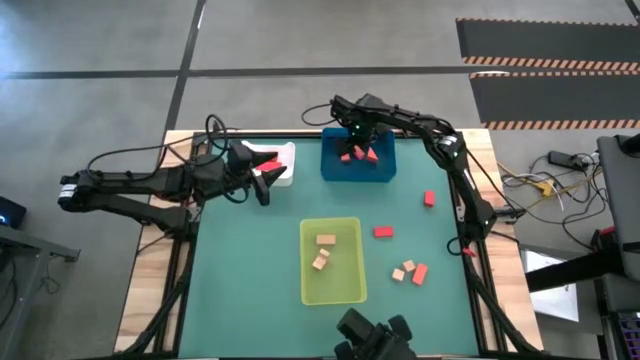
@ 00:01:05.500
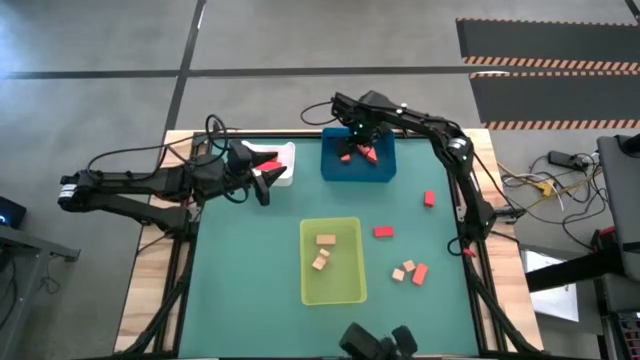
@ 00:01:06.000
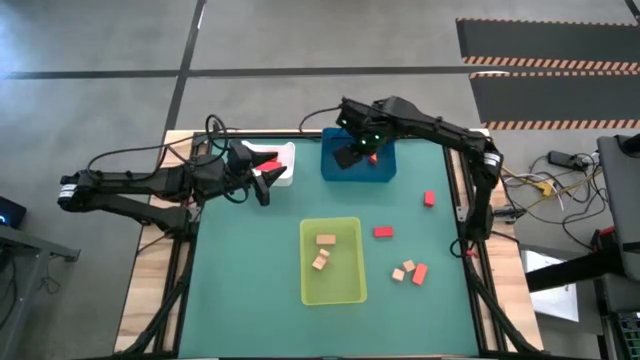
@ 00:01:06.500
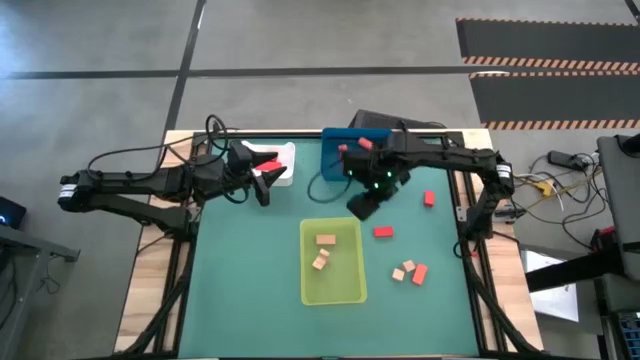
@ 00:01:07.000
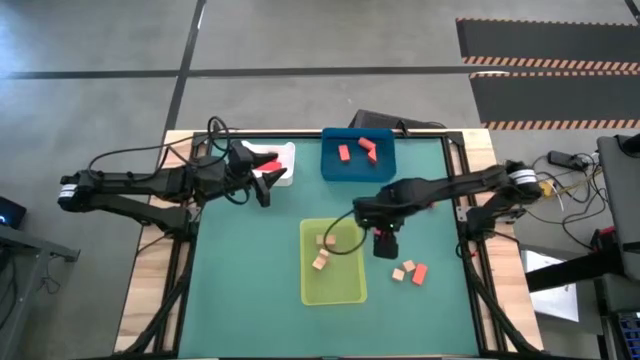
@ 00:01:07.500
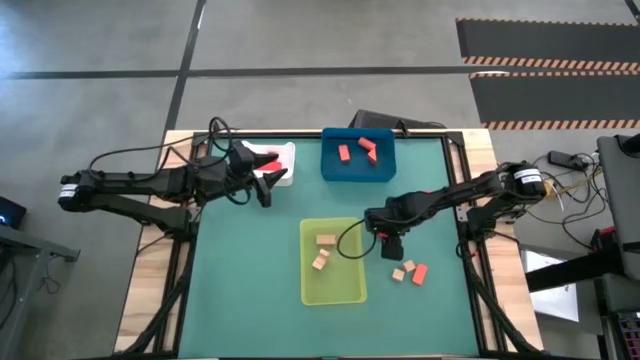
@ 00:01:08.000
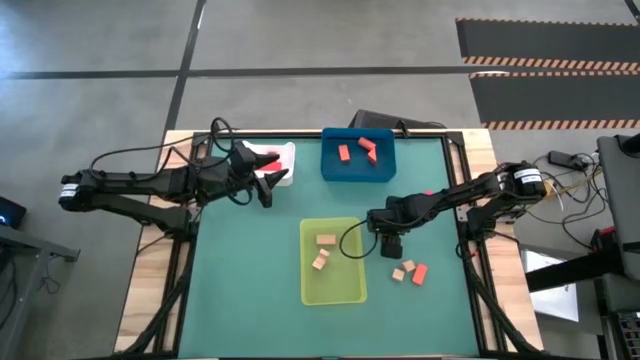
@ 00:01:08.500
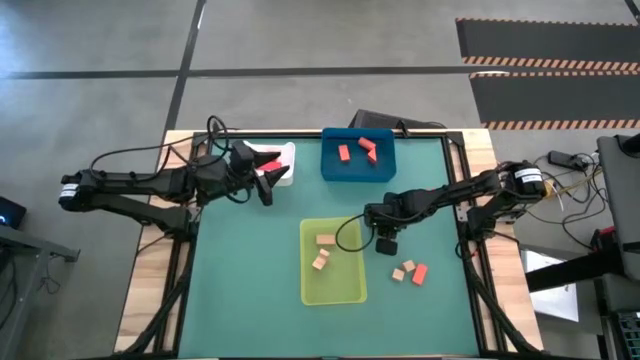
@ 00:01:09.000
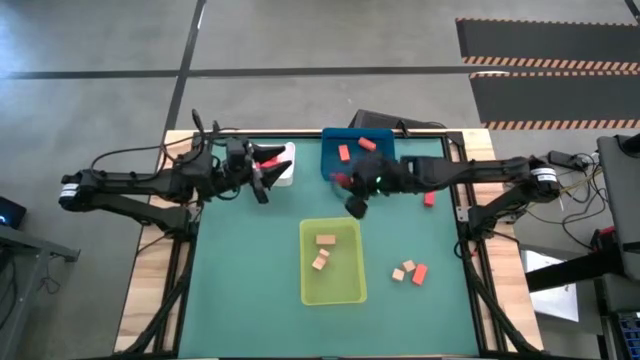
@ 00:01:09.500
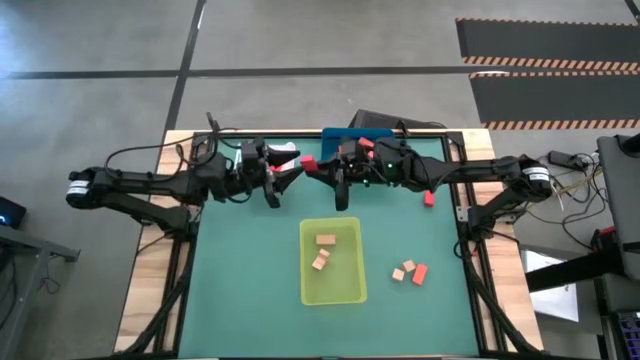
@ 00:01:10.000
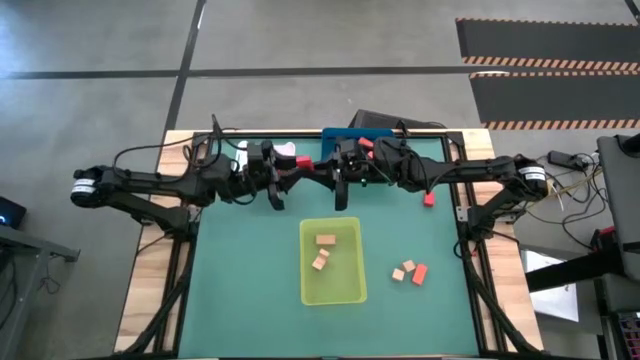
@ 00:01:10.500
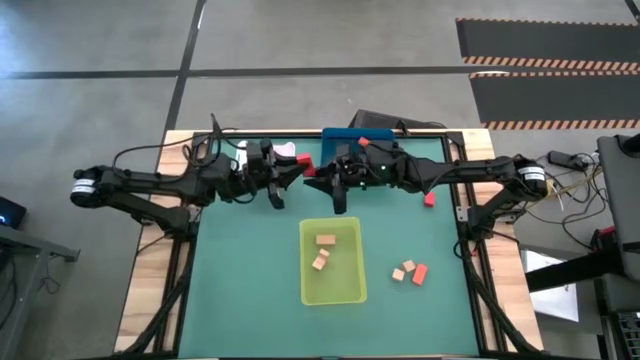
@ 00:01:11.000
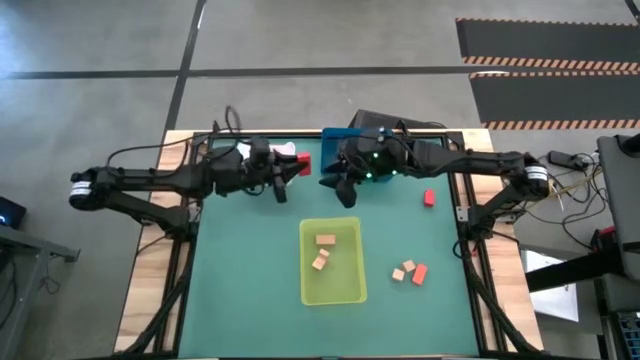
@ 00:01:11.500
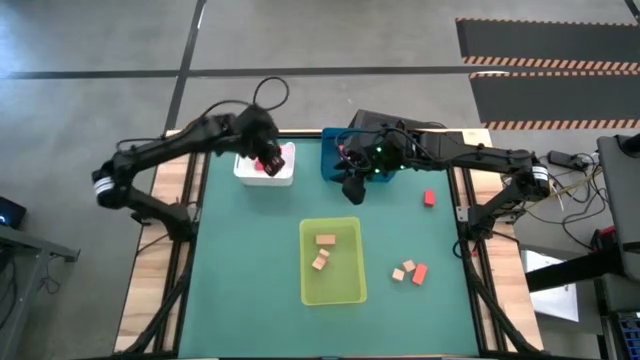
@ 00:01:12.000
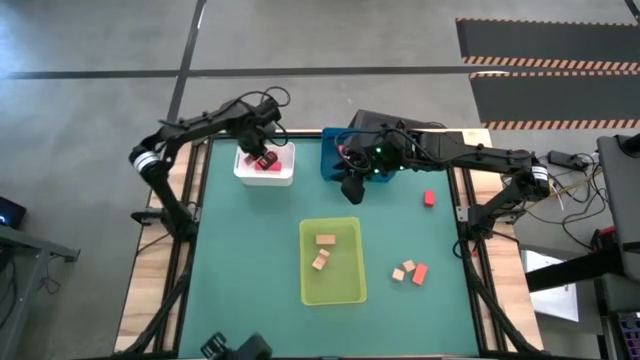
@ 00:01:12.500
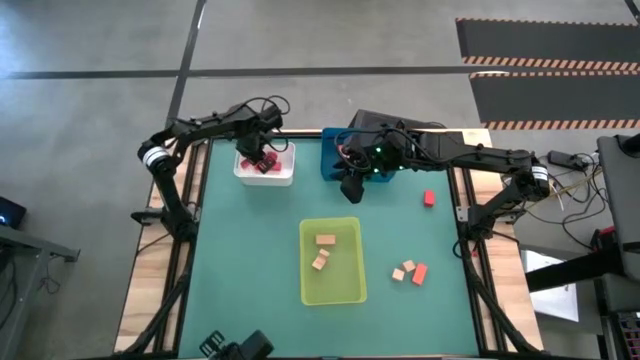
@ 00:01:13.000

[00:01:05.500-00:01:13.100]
Task: Sort & place blocks by color
Put the red rectangular block into the white bin

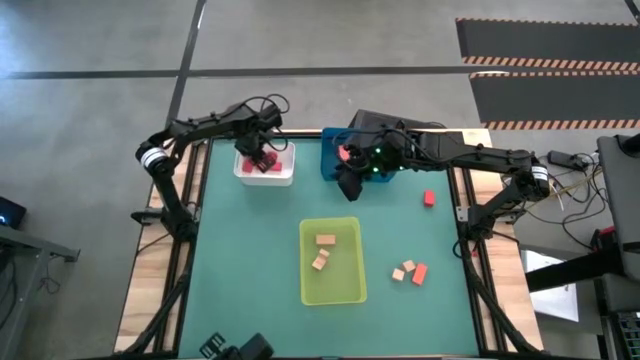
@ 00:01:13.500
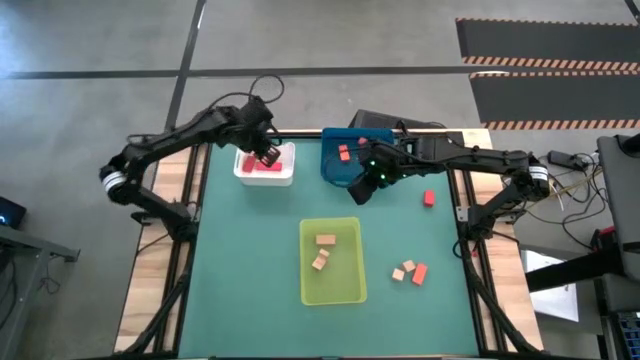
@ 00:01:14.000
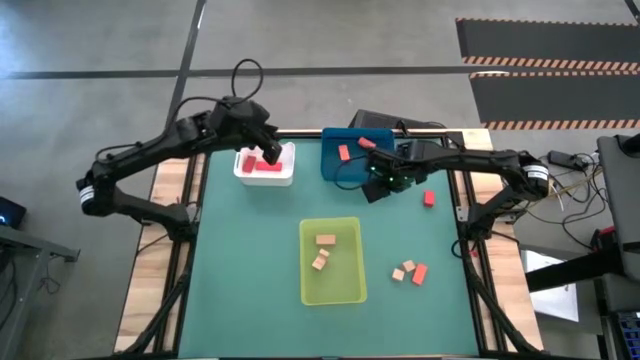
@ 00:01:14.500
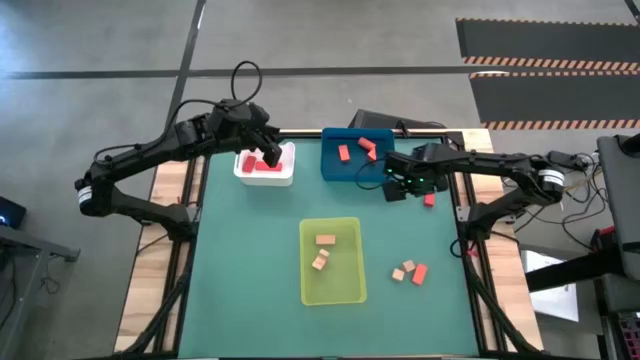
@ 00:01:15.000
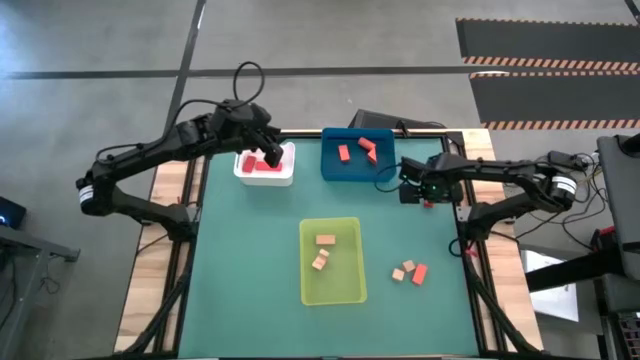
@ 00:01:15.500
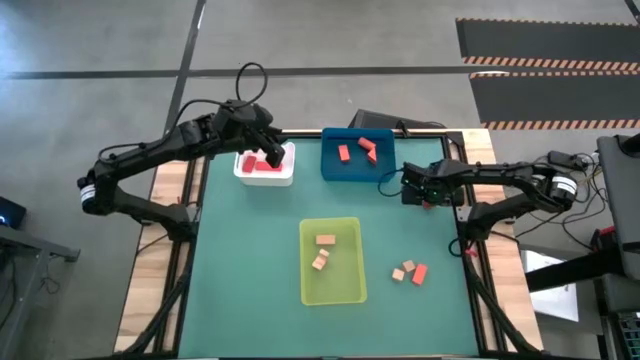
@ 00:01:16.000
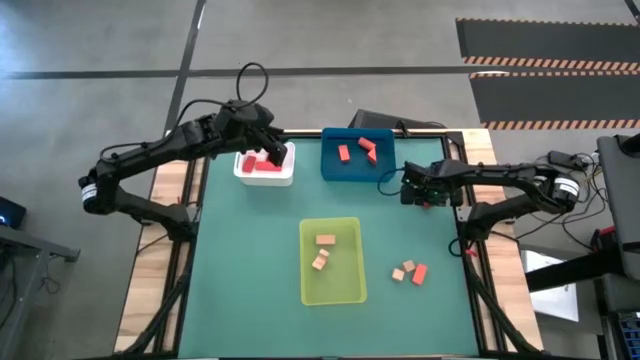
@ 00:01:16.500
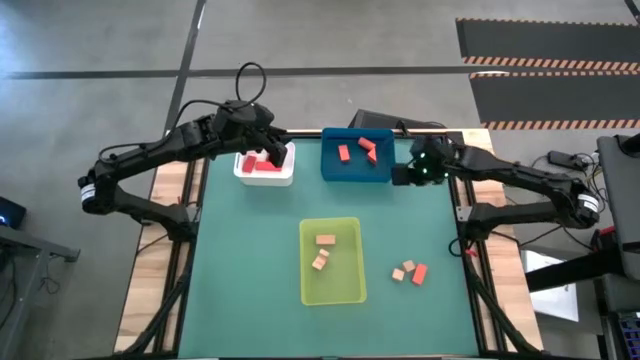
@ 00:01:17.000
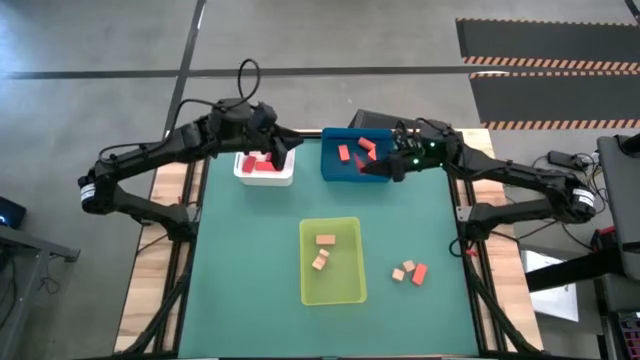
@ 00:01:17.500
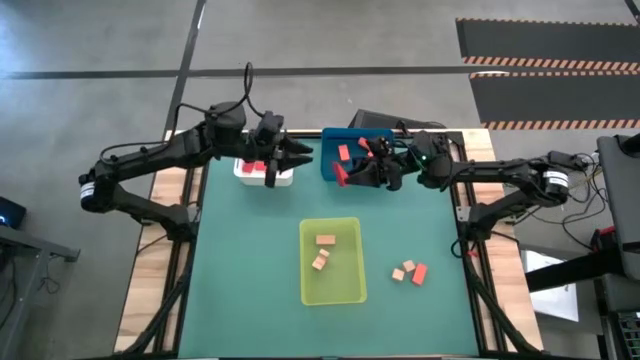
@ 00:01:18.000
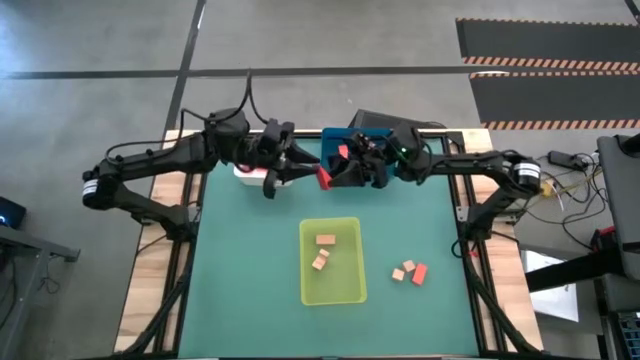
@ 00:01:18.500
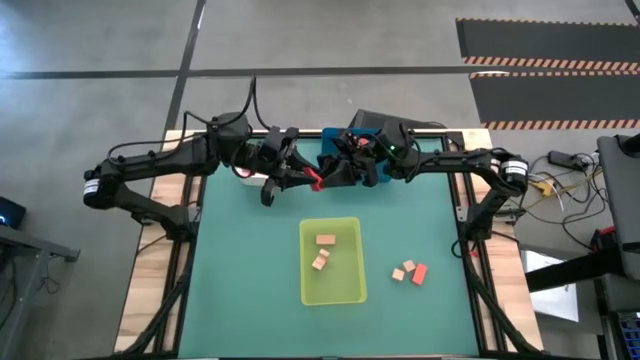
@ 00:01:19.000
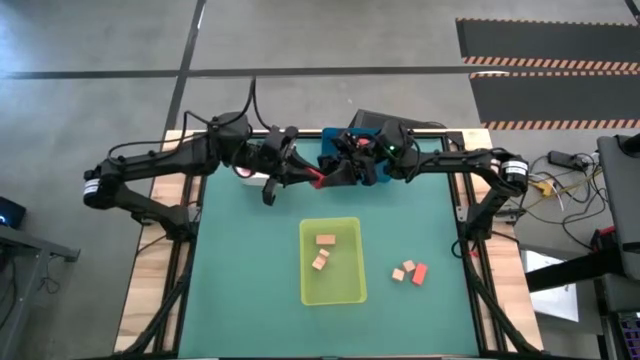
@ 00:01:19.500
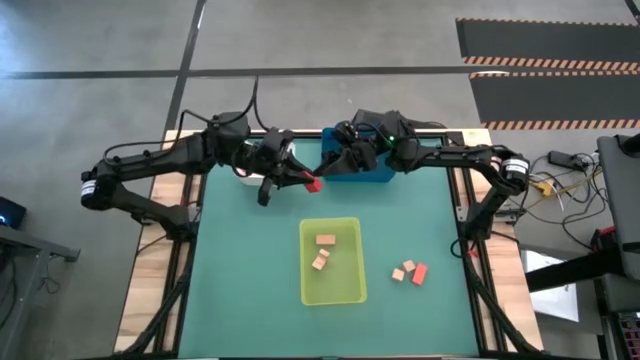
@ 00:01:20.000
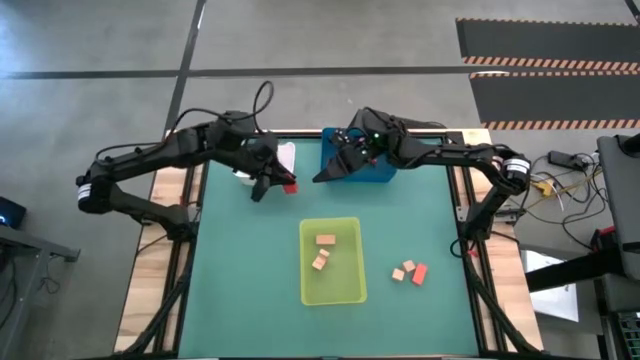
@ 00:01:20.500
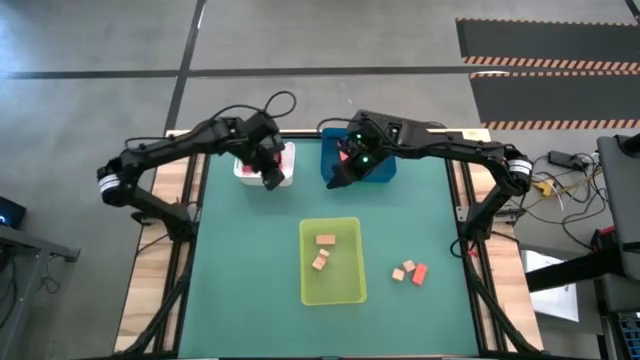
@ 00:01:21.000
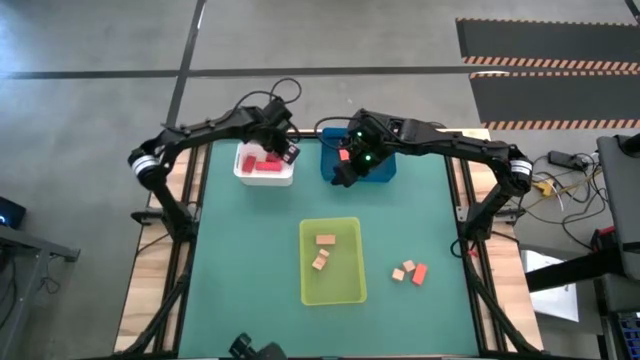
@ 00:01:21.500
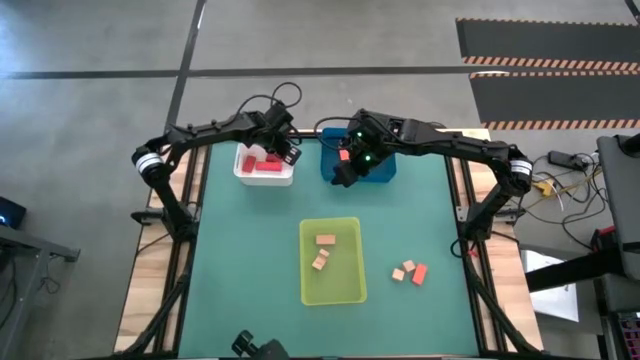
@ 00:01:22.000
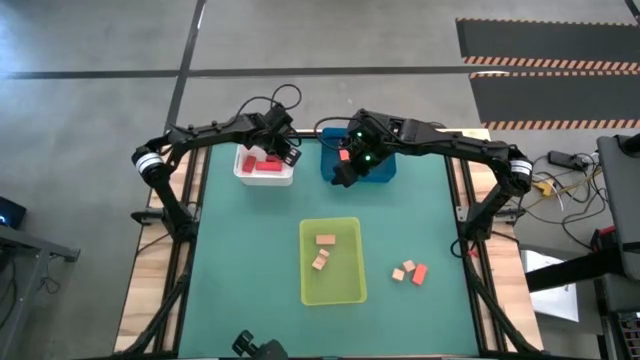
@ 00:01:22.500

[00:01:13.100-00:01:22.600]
Put the red triangular block into the white bin

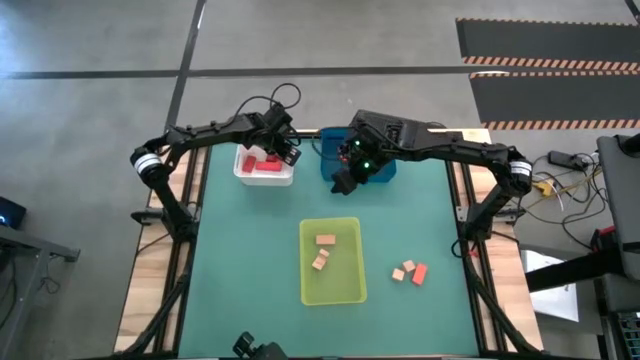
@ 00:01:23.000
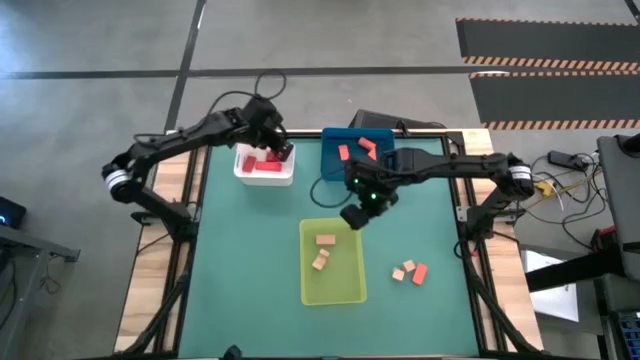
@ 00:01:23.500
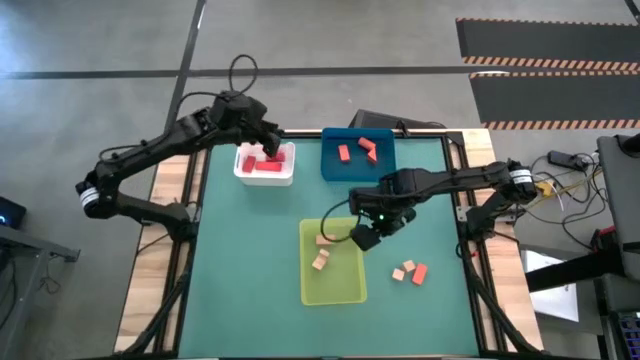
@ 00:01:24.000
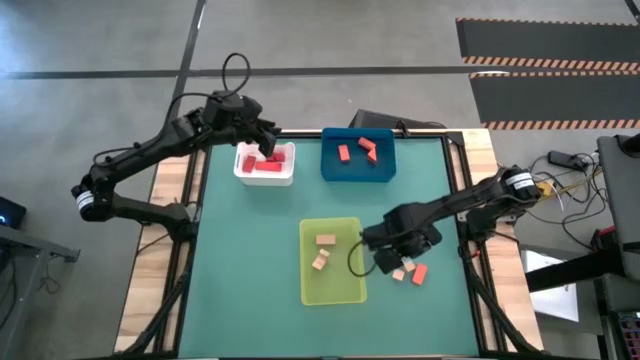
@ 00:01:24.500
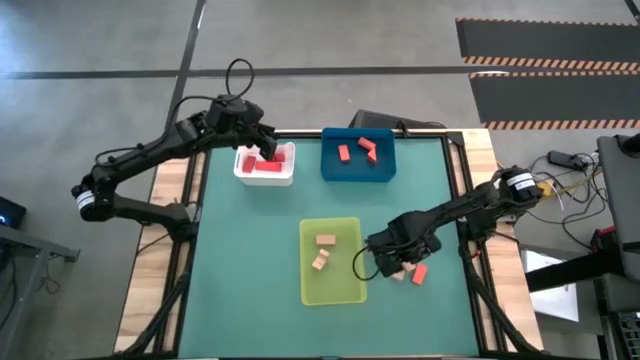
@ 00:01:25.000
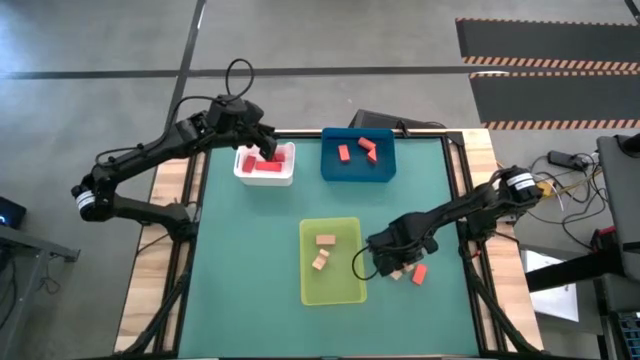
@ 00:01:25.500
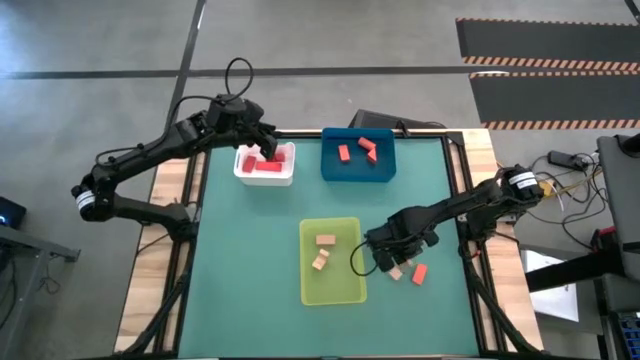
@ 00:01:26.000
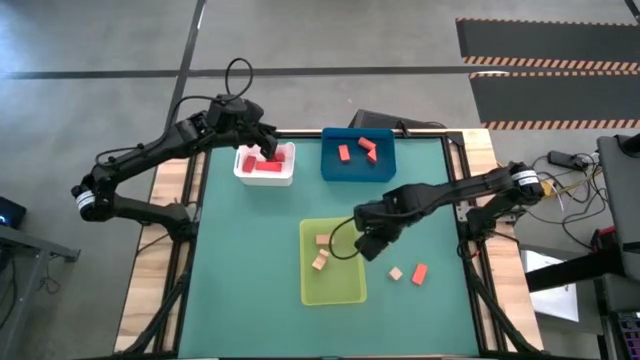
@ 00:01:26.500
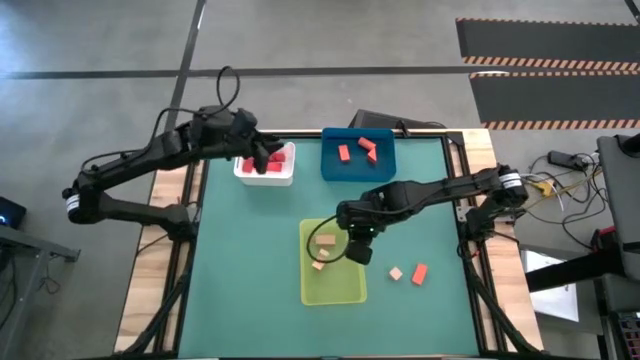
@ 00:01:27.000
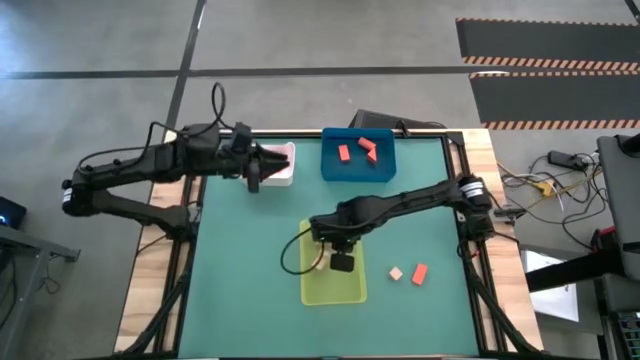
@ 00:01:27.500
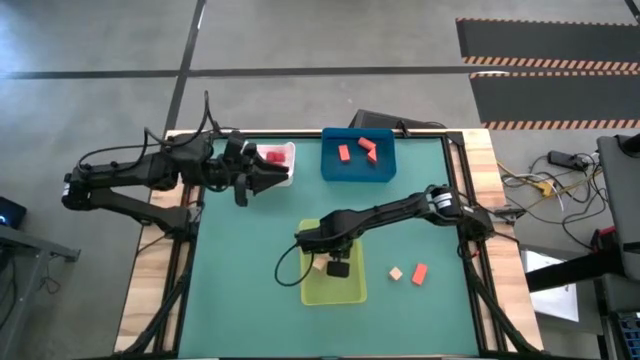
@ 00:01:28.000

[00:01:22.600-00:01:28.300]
Put the light orange triangular block into the yellow bin
